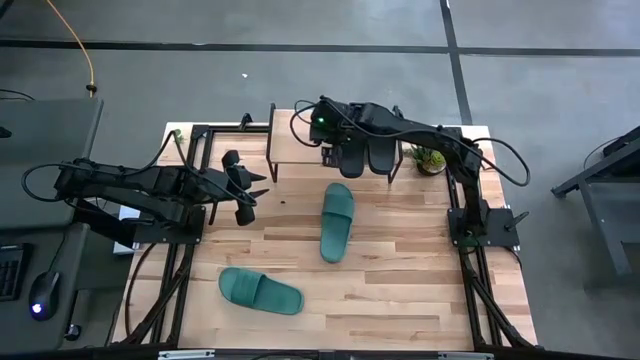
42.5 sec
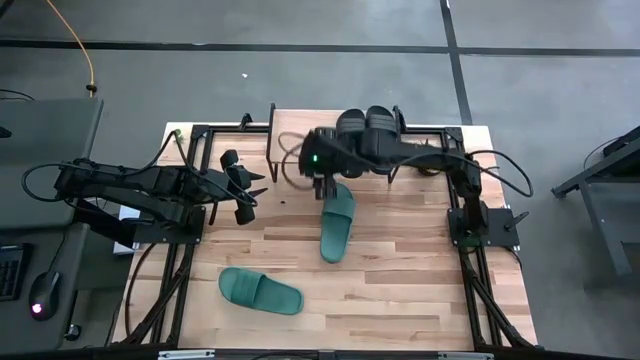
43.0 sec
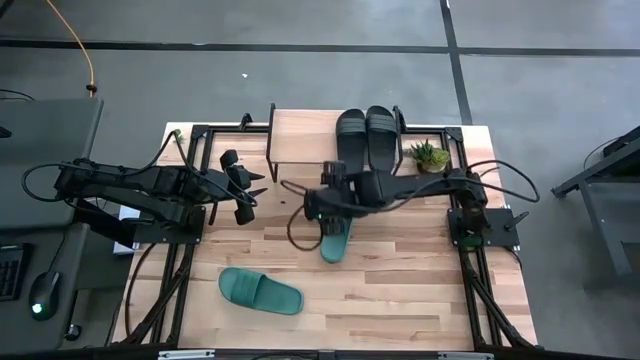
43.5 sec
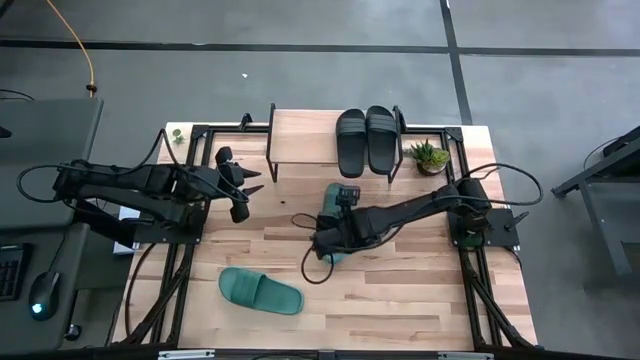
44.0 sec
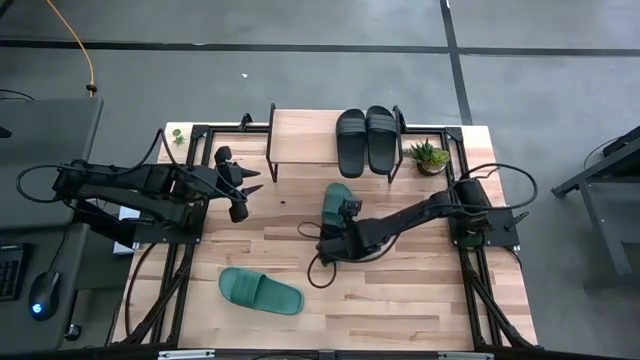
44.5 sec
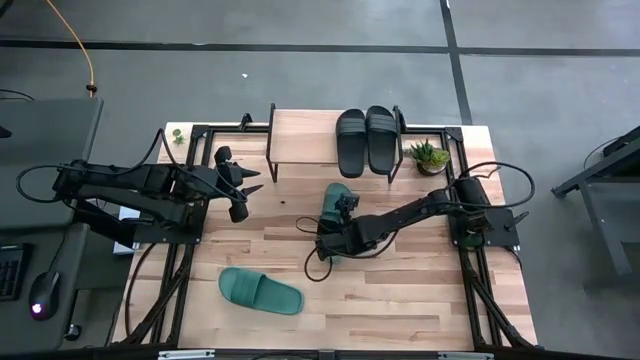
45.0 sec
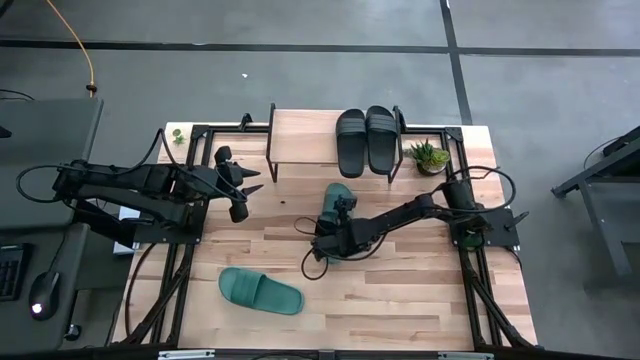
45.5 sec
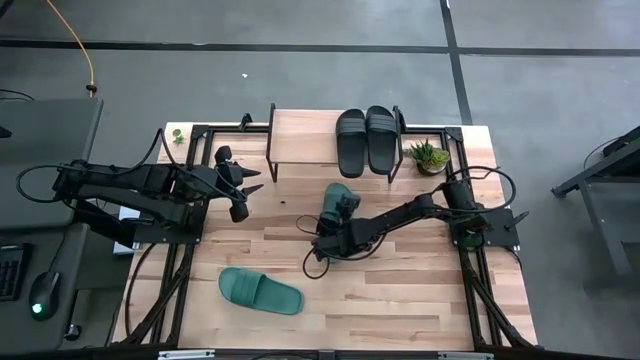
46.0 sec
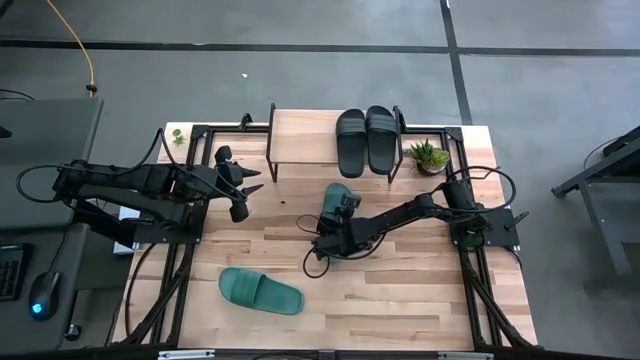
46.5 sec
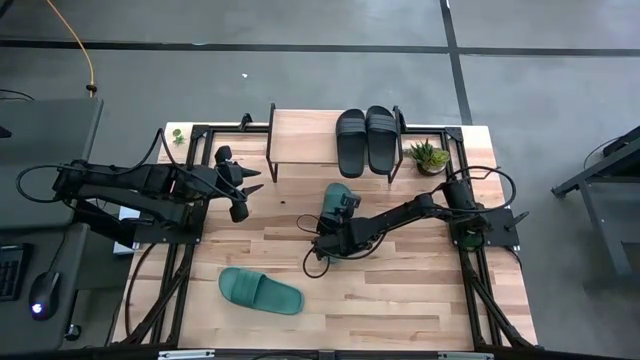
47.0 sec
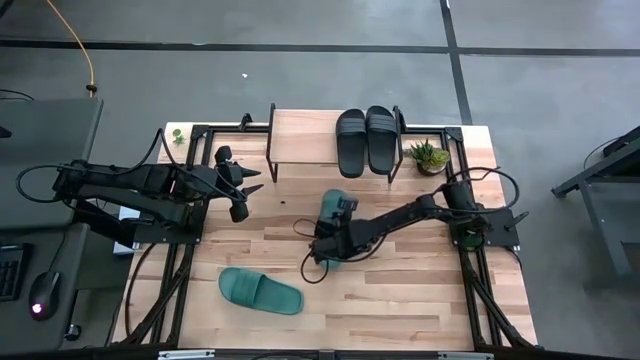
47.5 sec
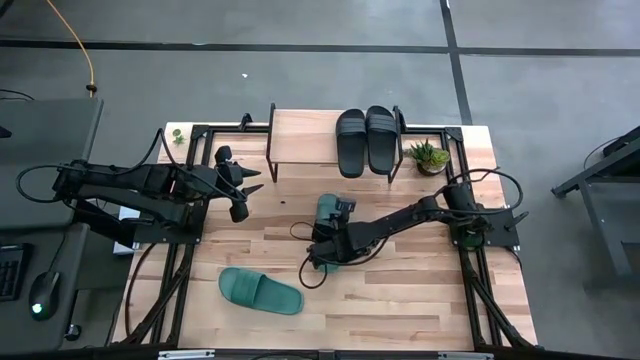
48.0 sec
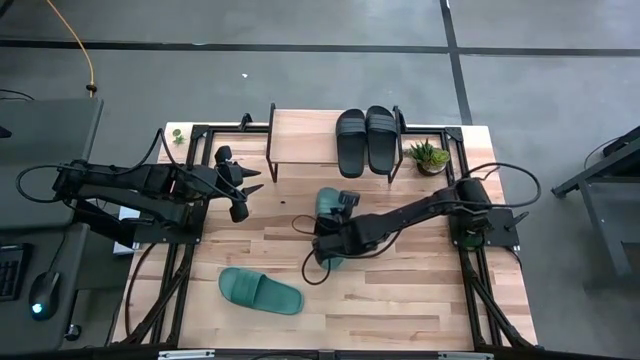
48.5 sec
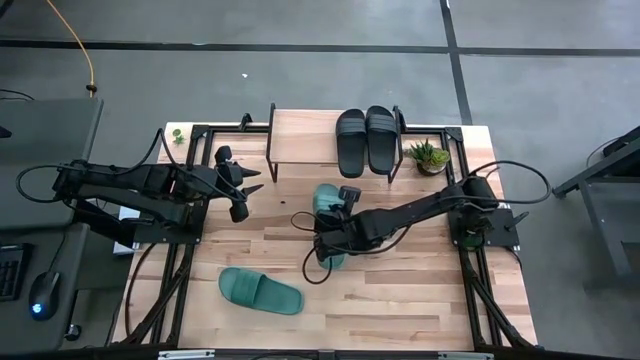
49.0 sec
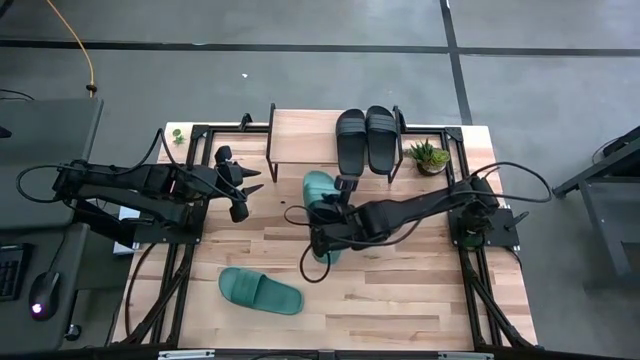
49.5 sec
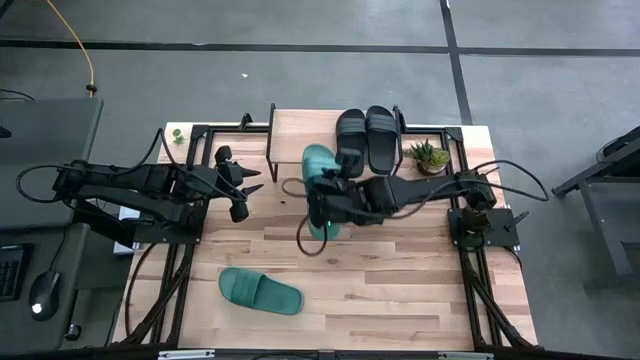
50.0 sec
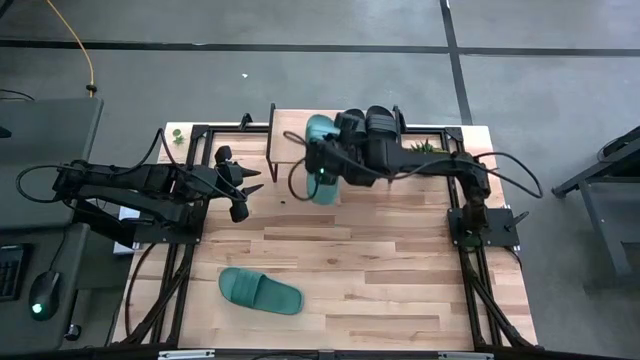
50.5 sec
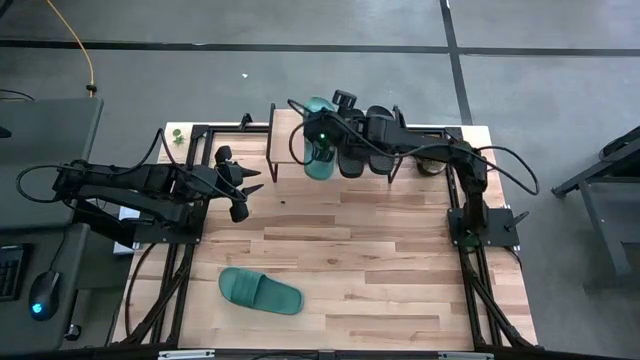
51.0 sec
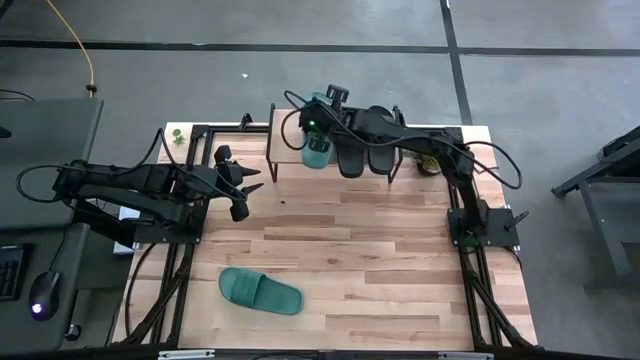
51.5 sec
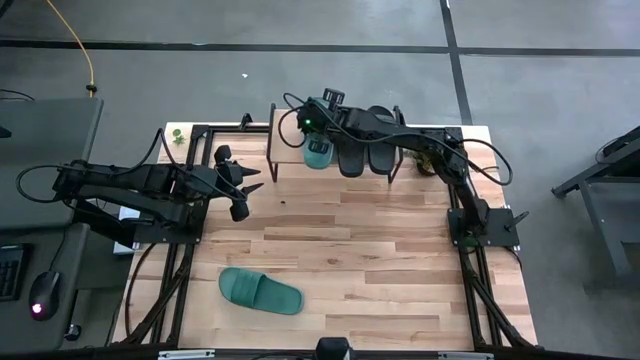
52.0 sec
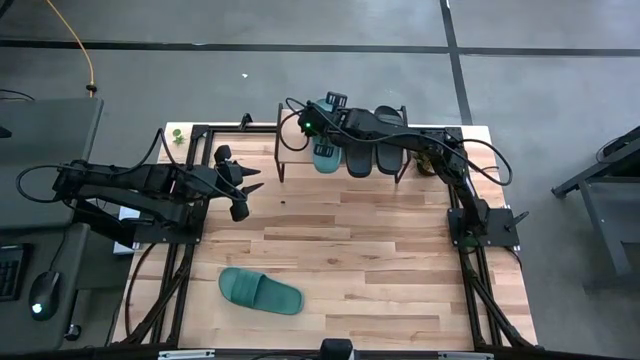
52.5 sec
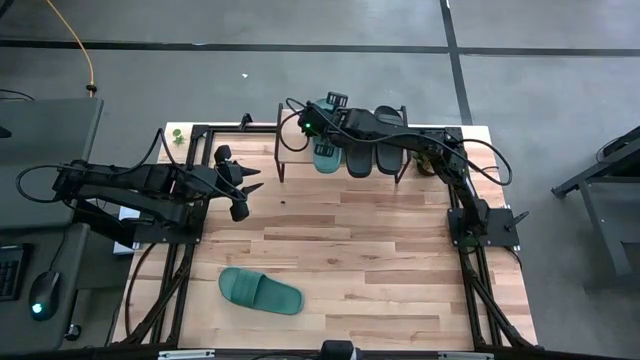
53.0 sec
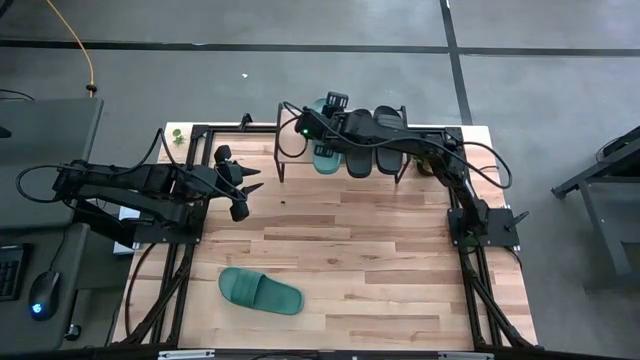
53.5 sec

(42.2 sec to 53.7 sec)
Task: Pick and place slides into the shelf
Put the top green slide on the shelf

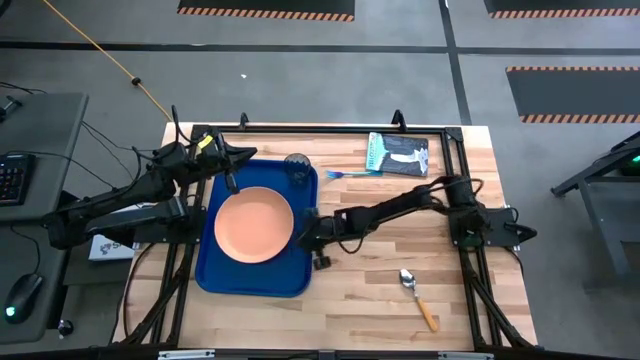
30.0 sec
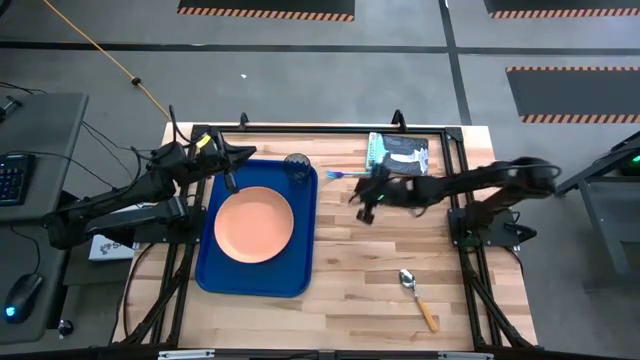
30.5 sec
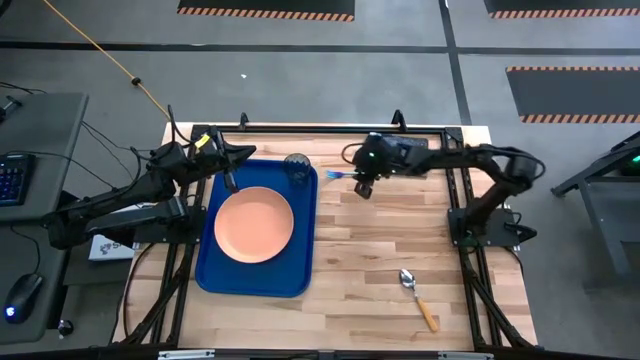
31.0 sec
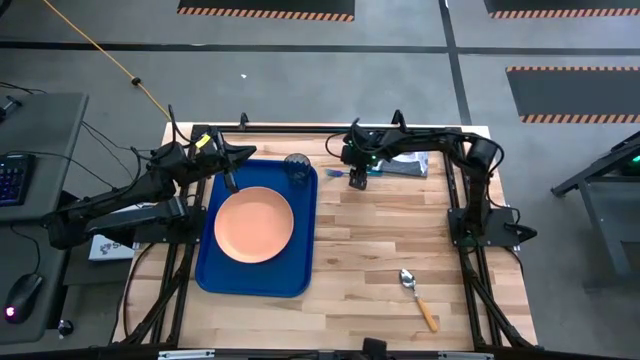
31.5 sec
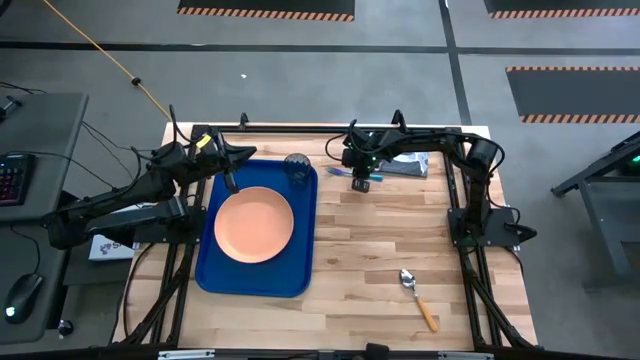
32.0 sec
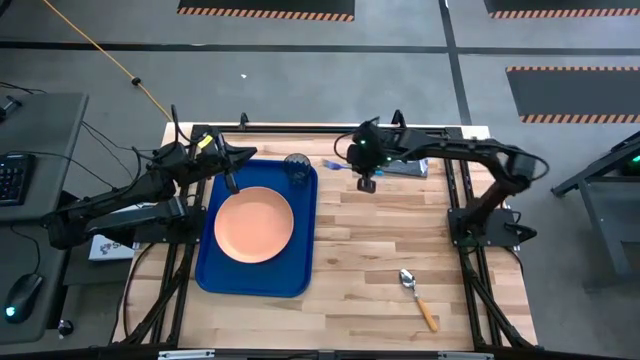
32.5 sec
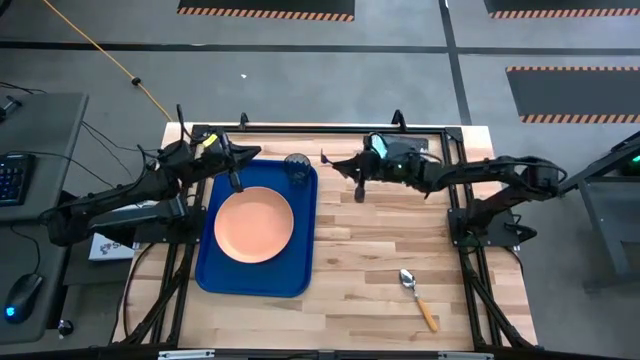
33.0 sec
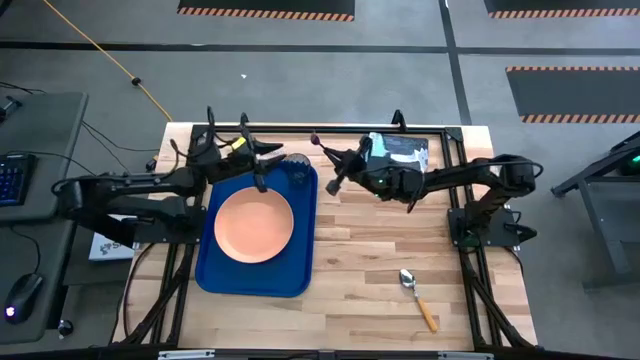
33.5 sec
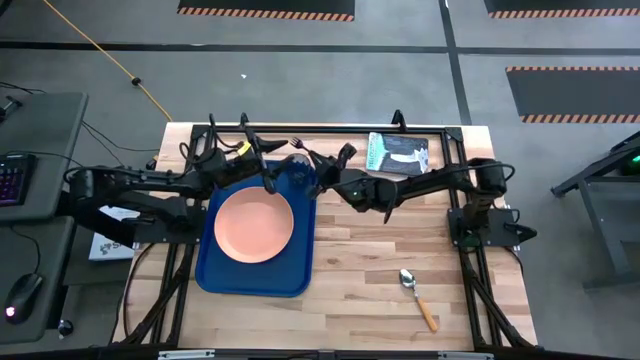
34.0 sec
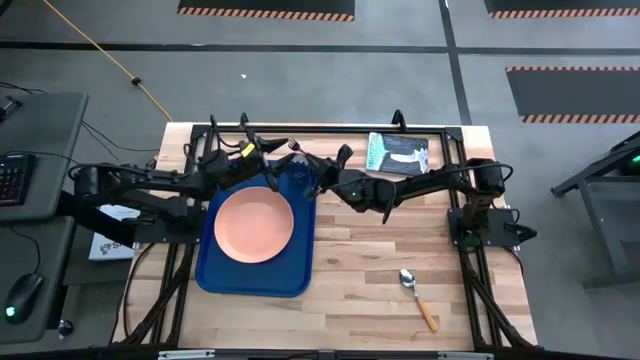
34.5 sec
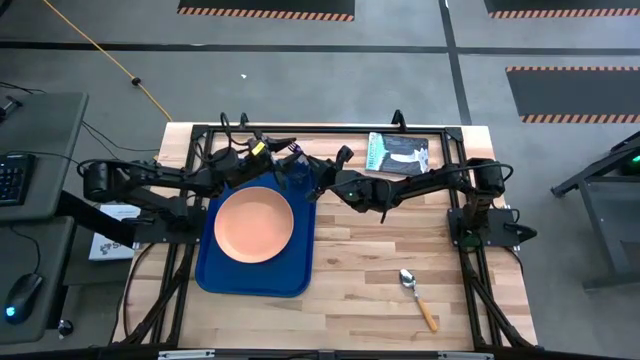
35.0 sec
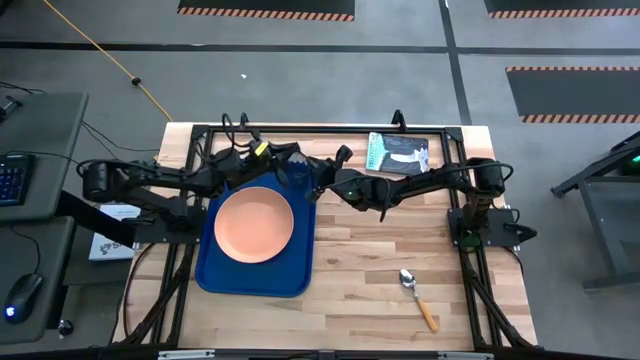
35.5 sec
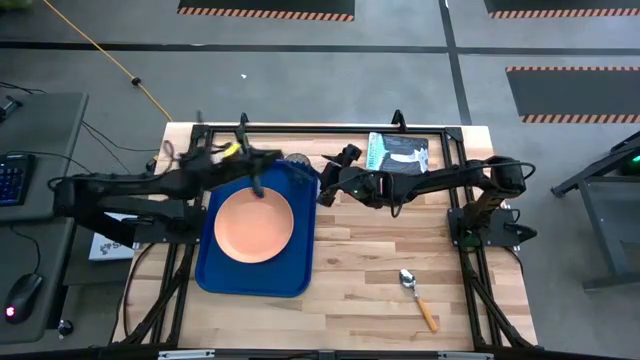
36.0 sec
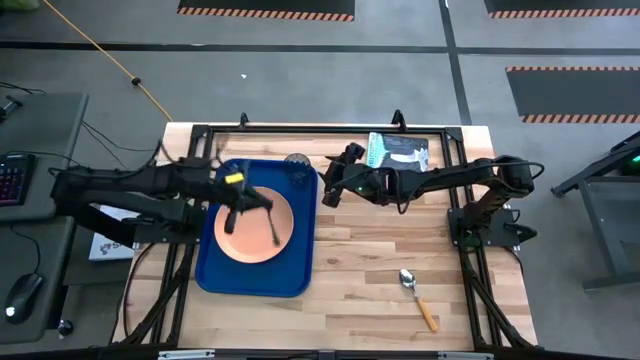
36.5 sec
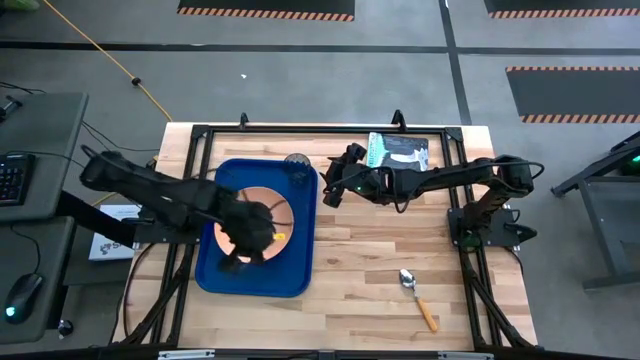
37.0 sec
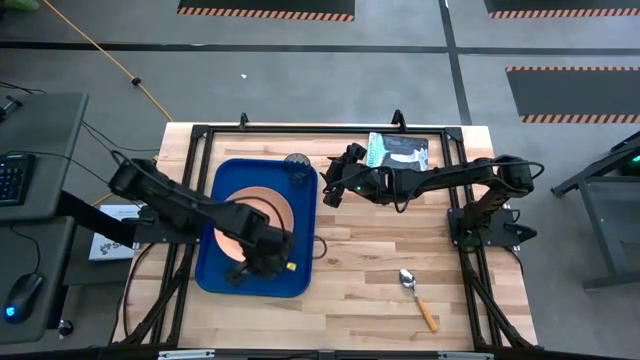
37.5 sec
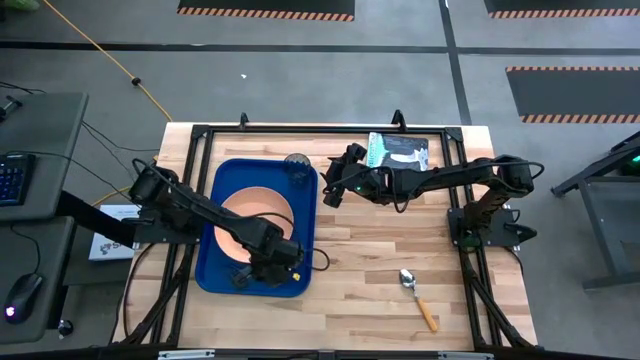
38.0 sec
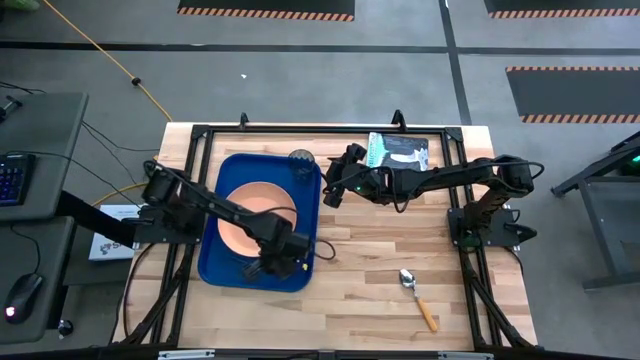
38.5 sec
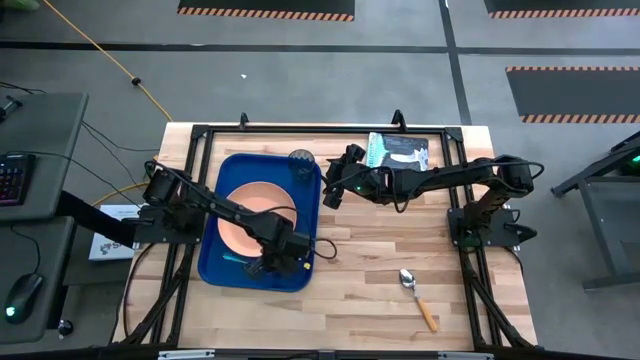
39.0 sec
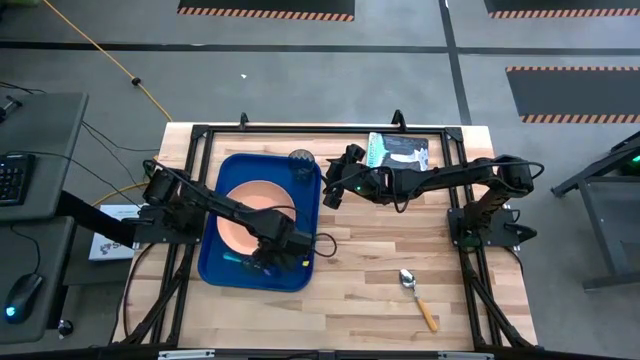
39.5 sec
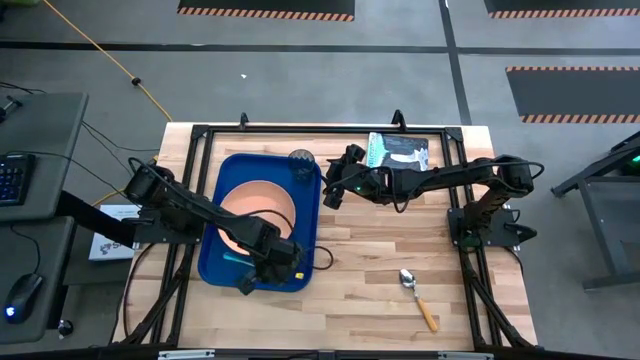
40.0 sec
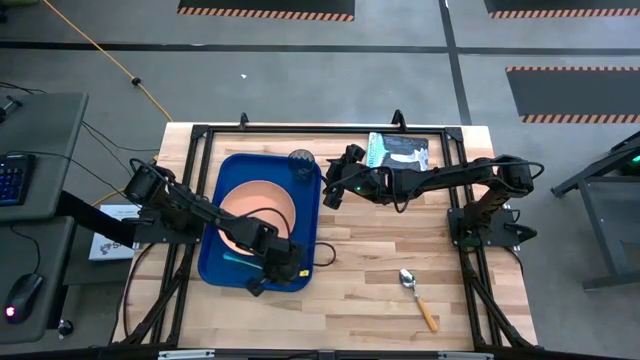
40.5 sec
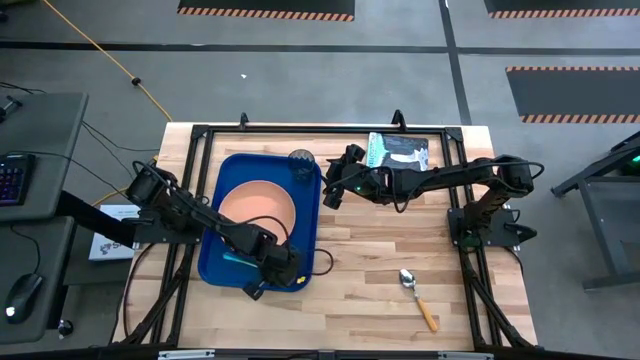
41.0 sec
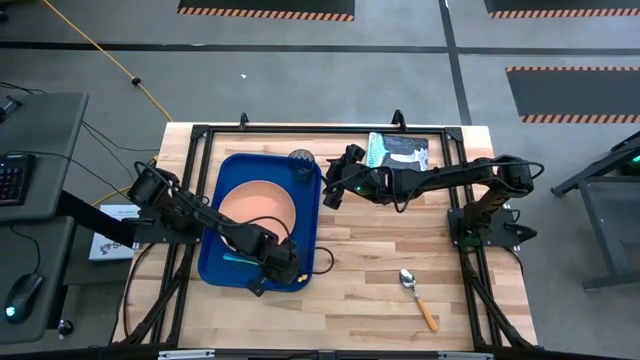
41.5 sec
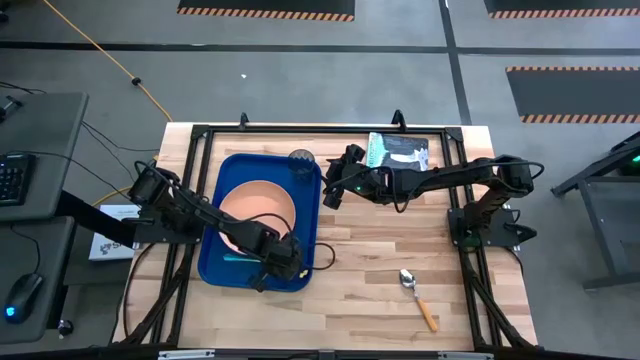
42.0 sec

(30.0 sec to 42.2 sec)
Task: Pick and place plate/cup/fork/spoon on tray
Put the blue fork below the light orange plate on the blue tray
